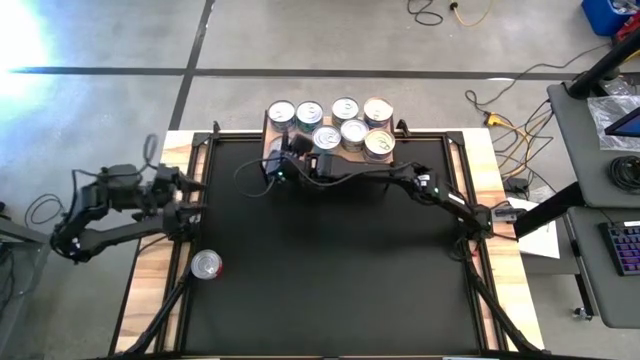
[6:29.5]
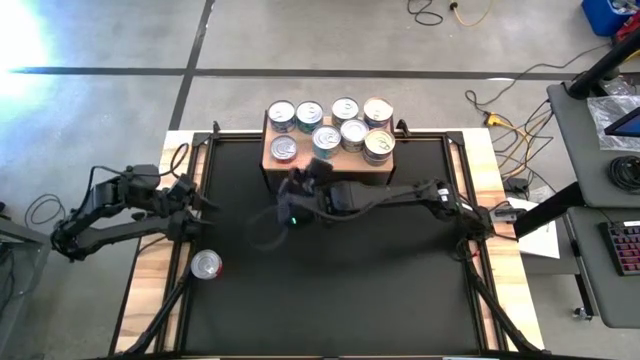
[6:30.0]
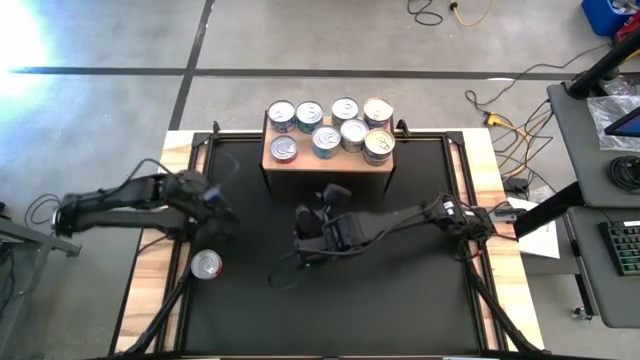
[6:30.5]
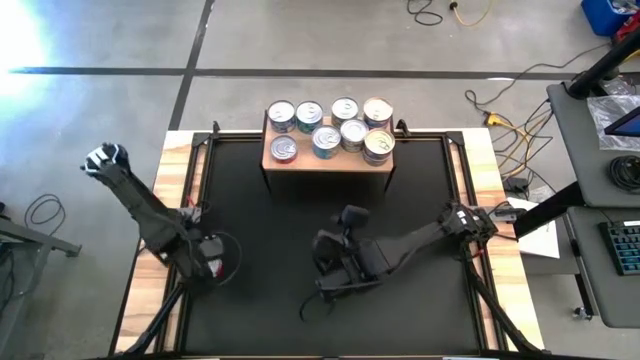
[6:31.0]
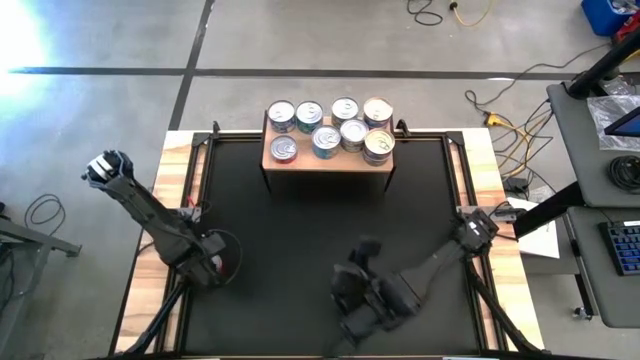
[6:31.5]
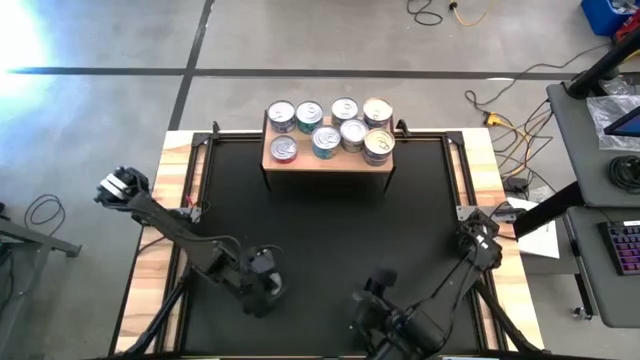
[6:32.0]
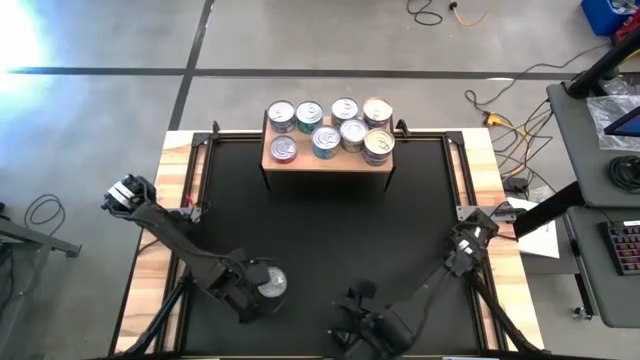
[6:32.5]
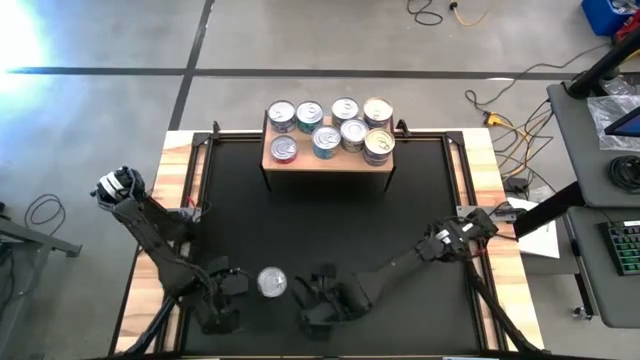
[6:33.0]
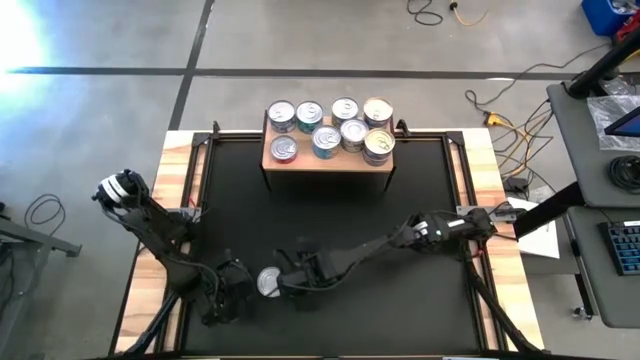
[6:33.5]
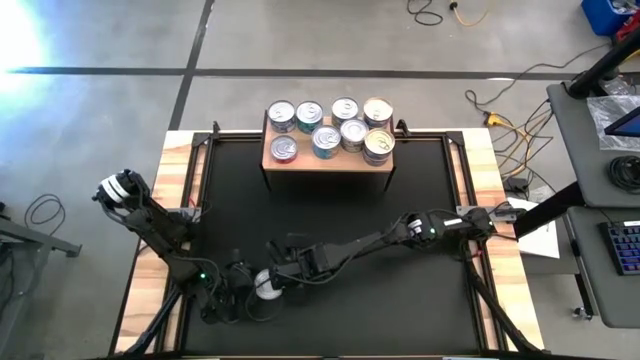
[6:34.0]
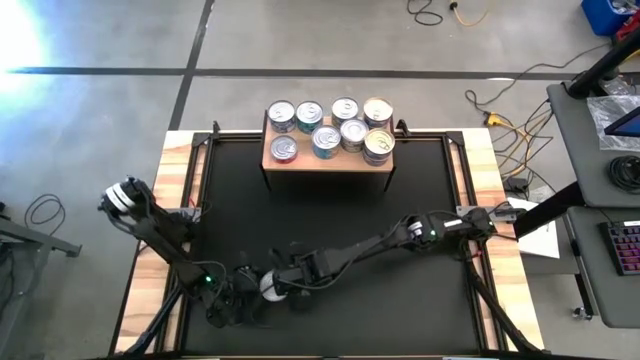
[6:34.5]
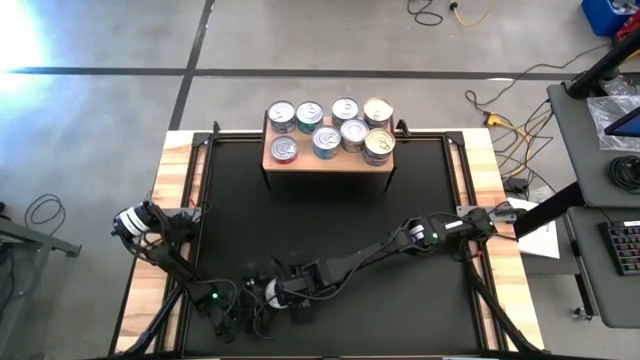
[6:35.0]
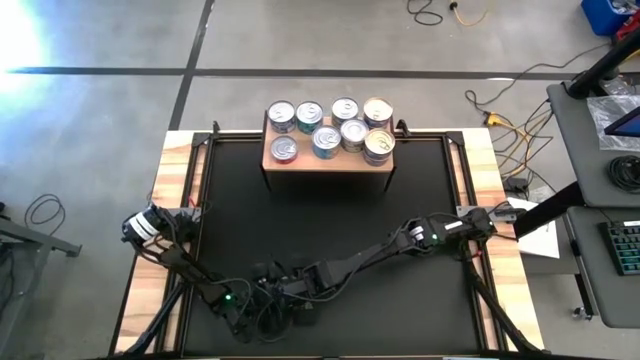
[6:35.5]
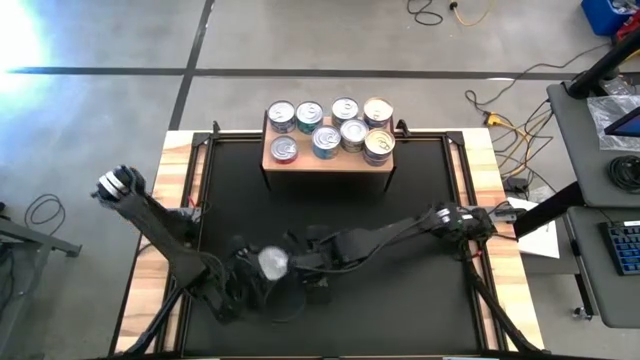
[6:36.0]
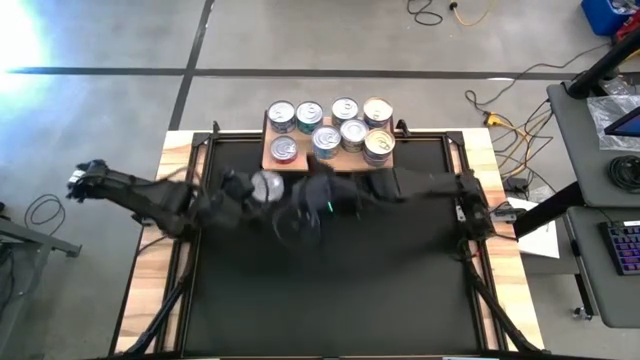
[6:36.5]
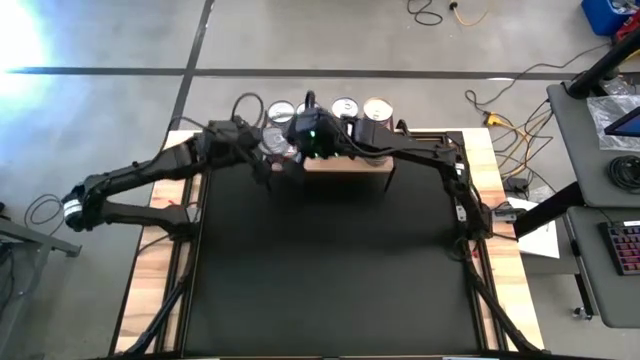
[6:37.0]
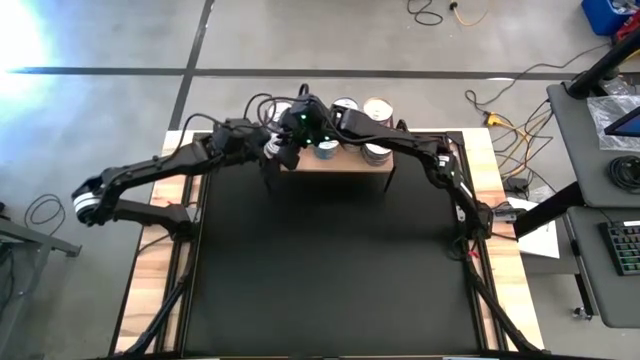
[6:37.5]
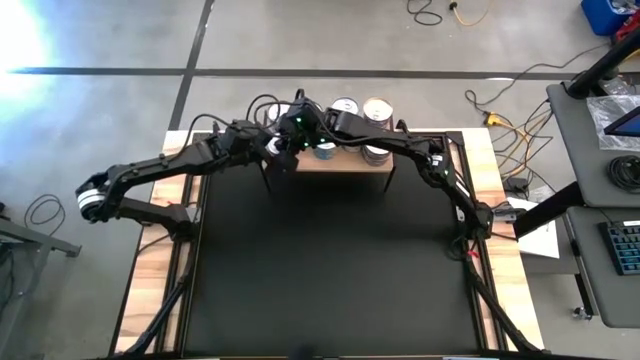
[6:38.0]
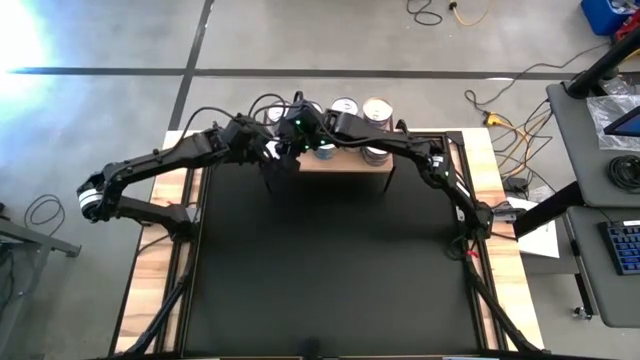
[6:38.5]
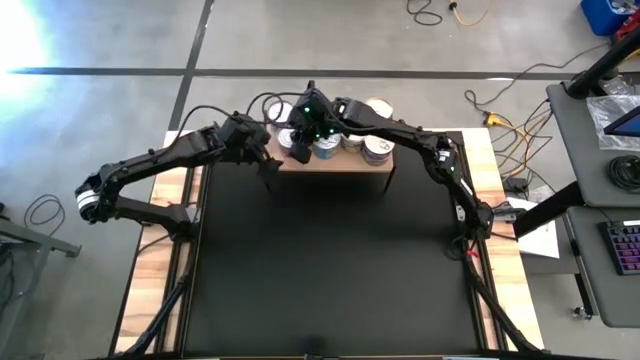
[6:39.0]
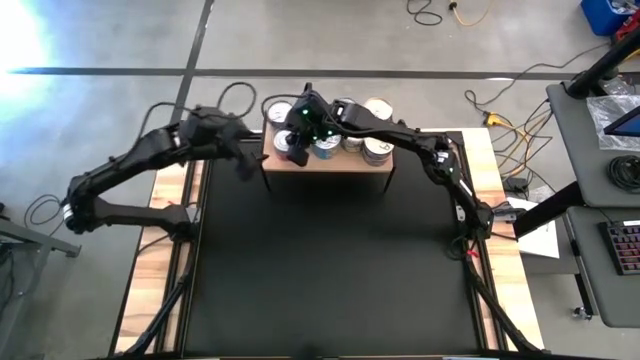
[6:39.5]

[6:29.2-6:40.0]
Task: Stack canned seafood by type on shelf
Stack the red tuna can on top of the red tuna can on the shelf

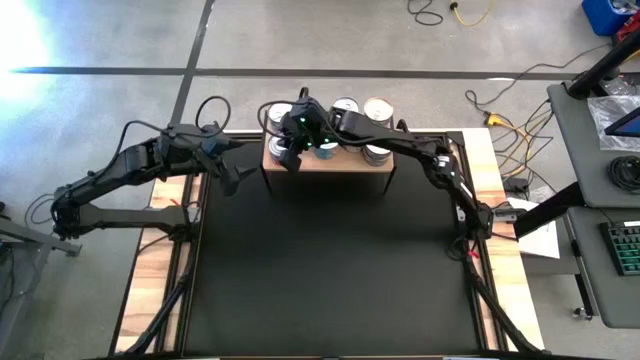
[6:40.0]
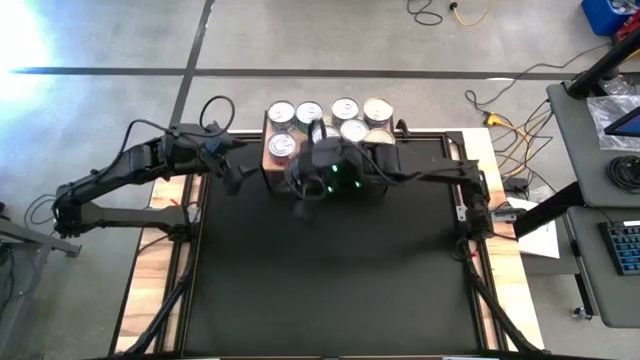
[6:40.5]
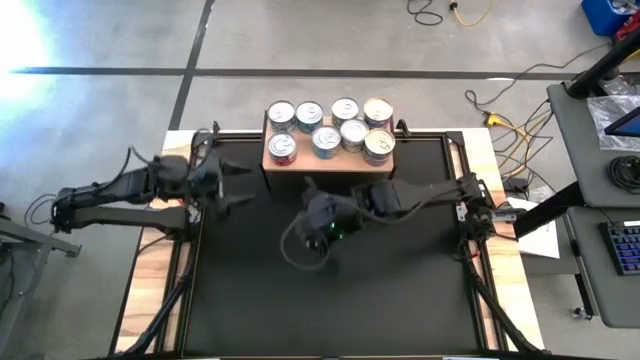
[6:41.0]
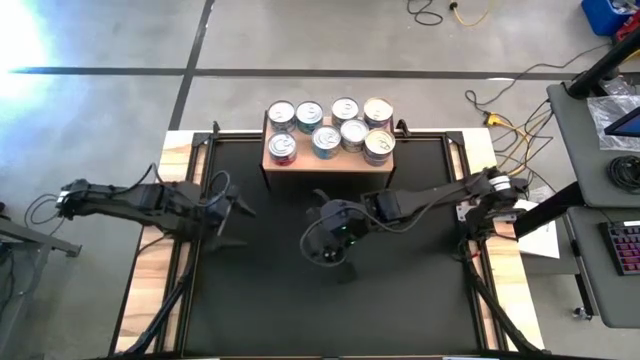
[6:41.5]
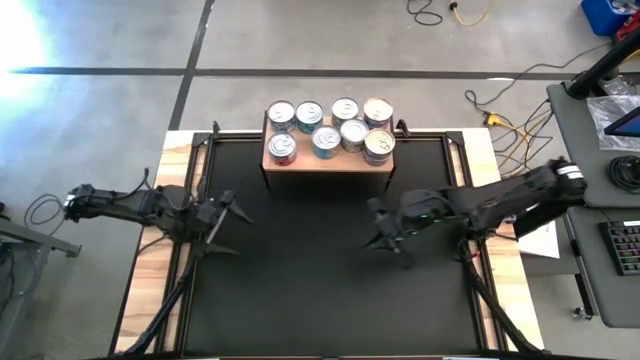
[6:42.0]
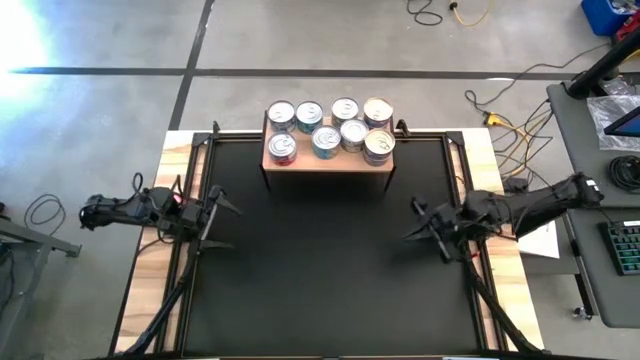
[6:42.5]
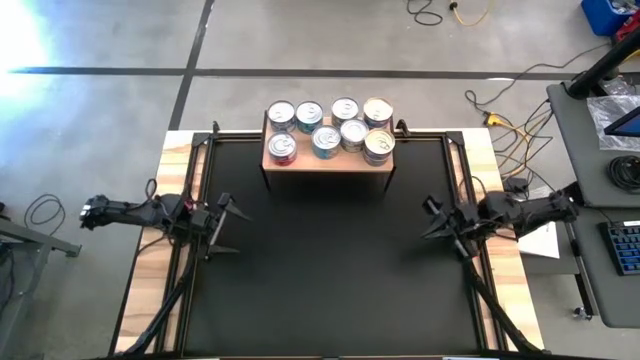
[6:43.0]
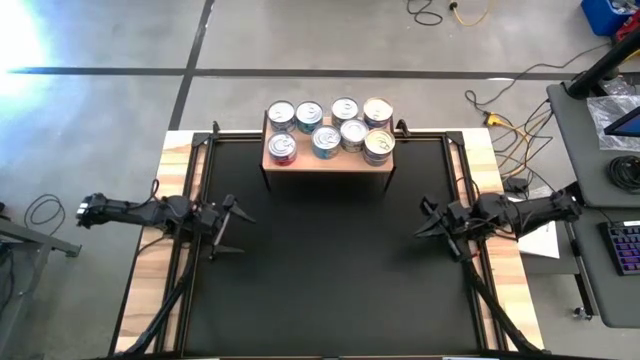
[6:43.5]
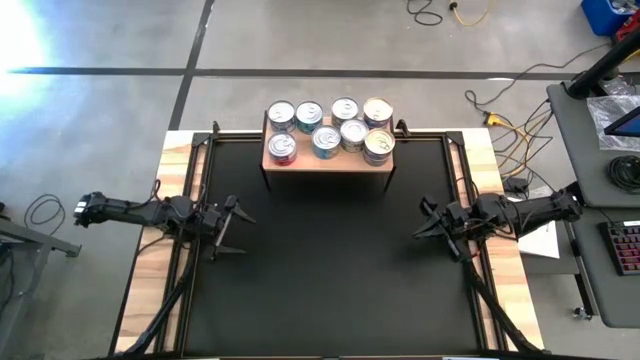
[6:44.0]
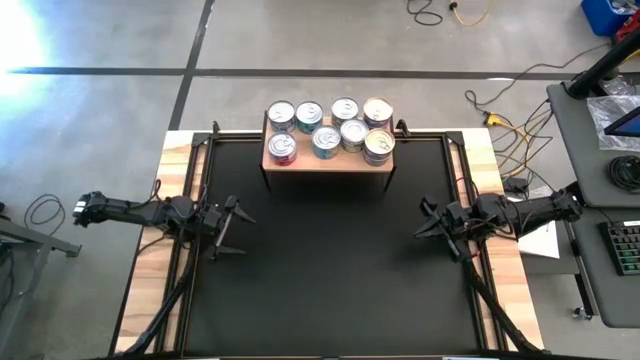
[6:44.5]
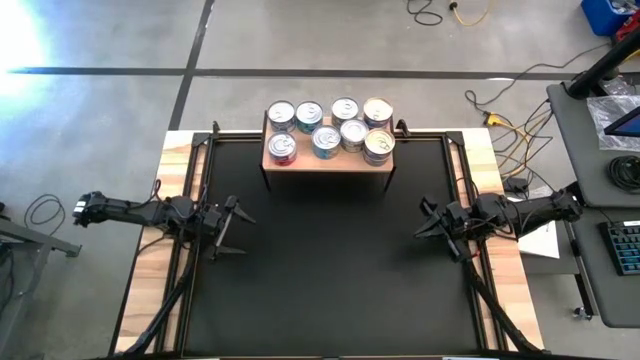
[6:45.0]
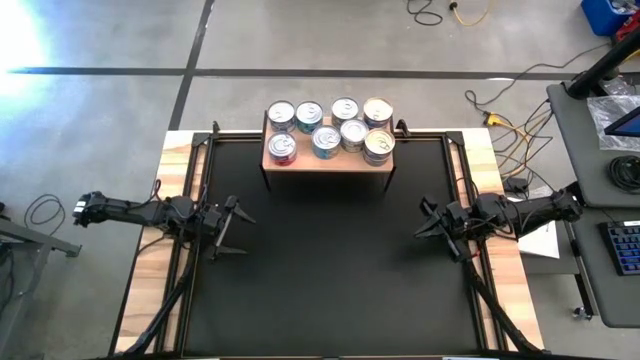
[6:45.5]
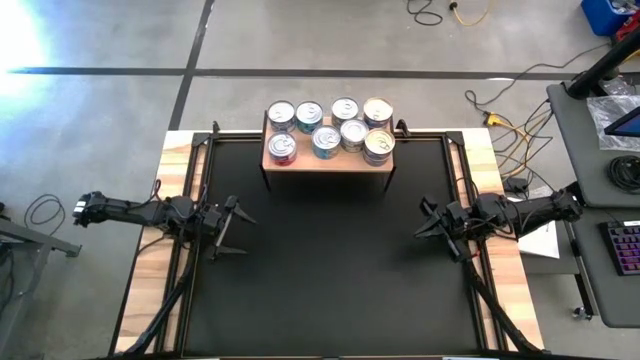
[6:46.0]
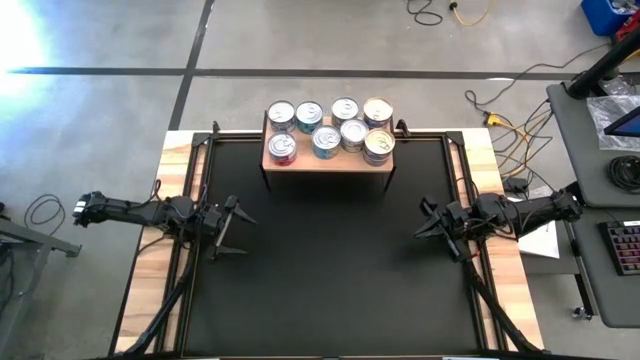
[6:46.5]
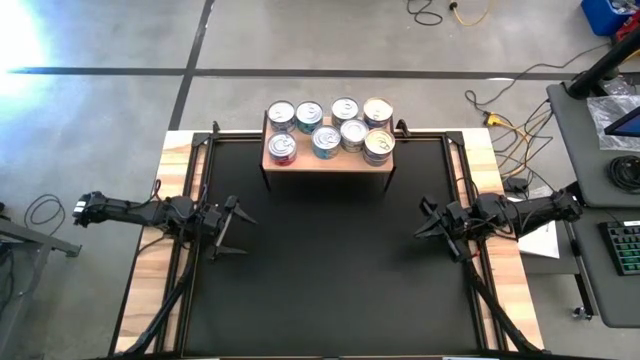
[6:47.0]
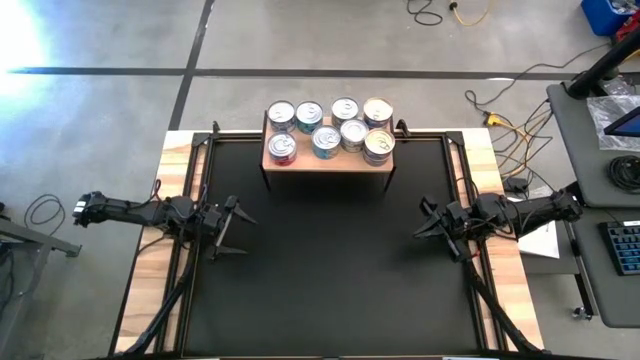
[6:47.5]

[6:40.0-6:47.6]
Return to Home Position

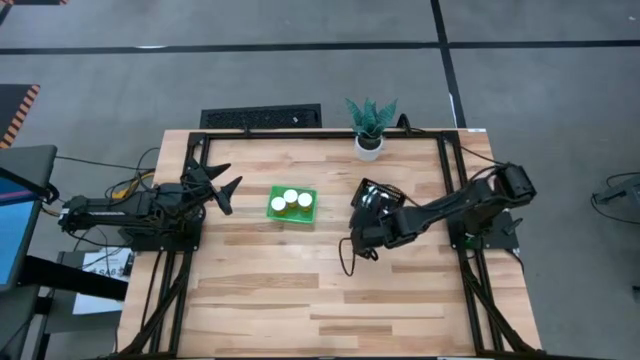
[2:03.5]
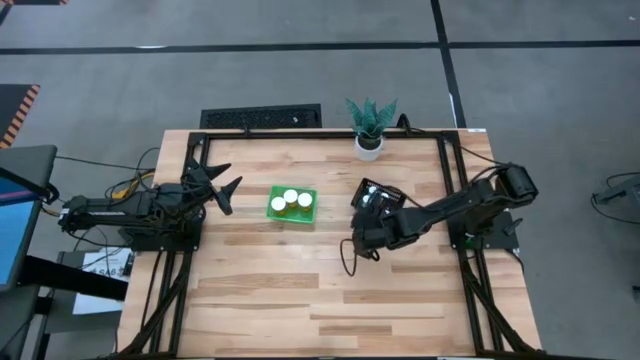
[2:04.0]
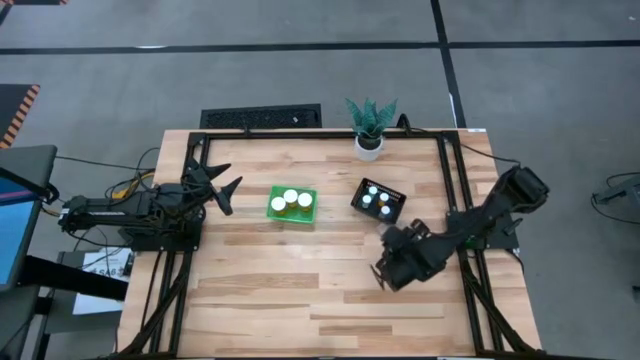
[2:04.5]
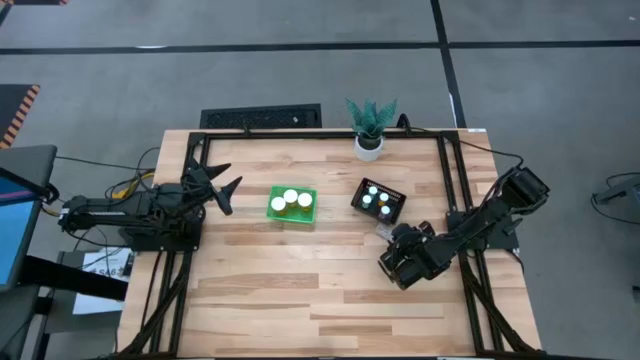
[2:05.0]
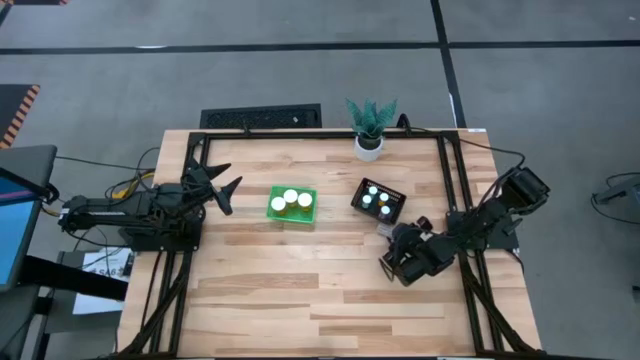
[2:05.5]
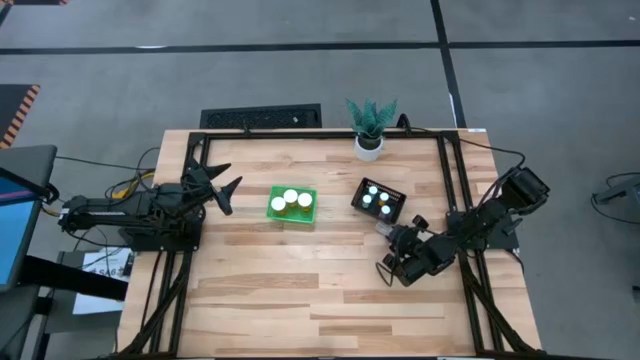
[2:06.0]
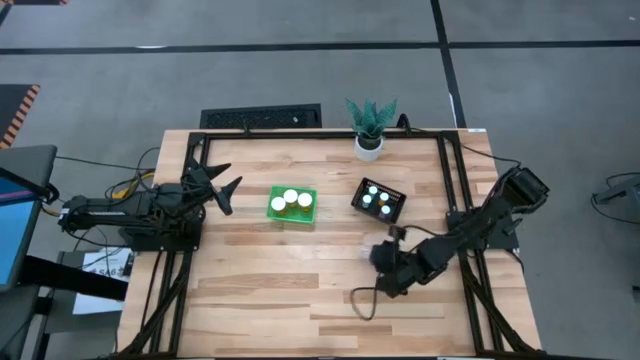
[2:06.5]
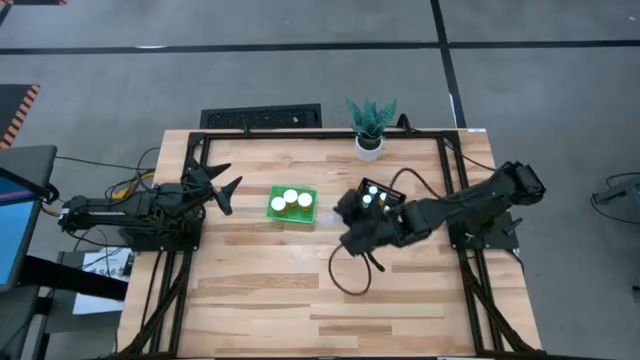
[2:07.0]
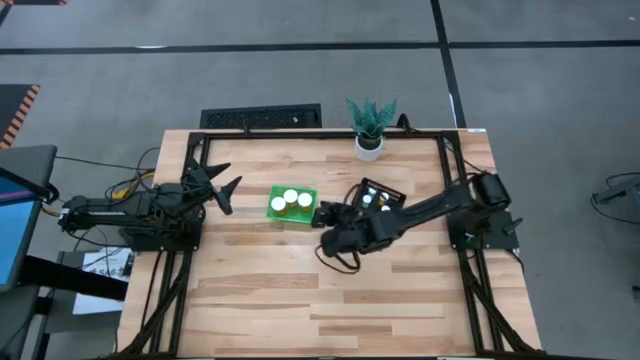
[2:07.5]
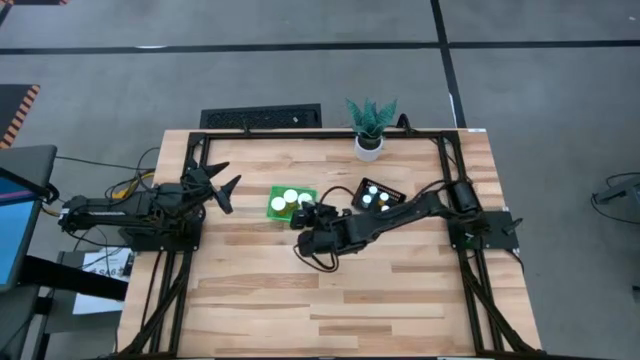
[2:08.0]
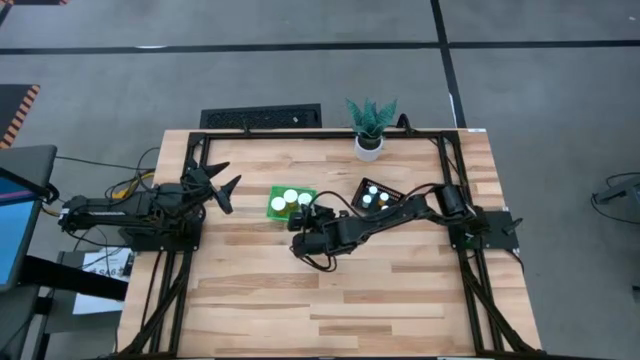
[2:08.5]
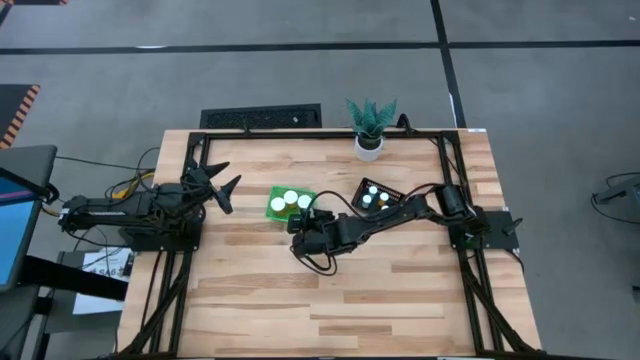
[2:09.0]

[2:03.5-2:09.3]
Task: Pick and place medicine bottles into bin by pill shape (circle, oval)
Put the transparent capsule bottle into the green basket
